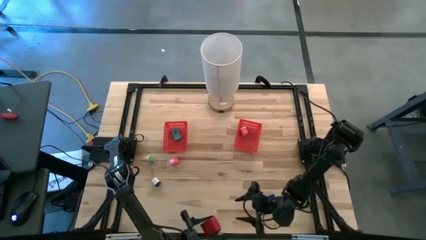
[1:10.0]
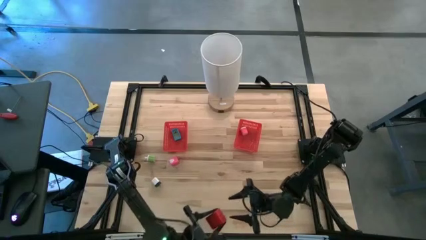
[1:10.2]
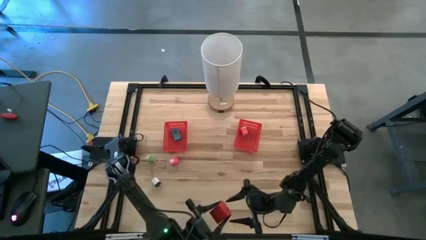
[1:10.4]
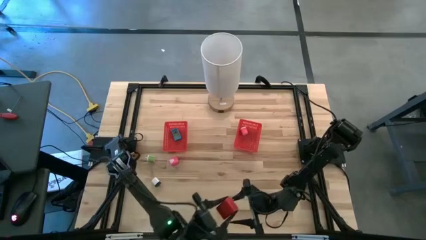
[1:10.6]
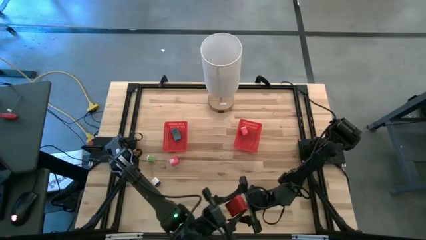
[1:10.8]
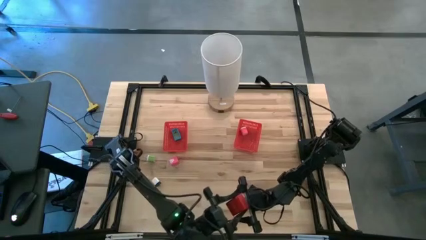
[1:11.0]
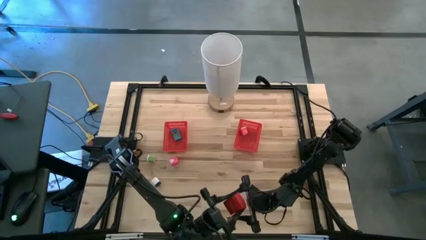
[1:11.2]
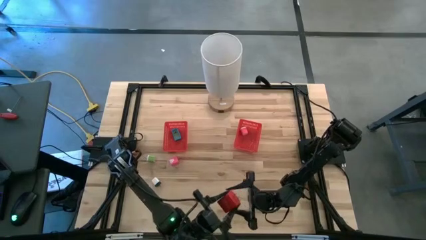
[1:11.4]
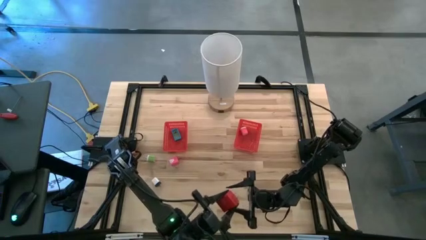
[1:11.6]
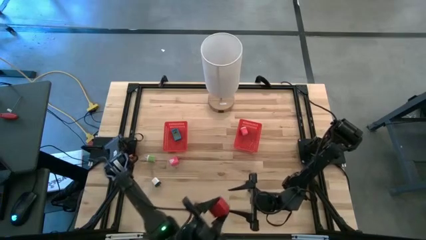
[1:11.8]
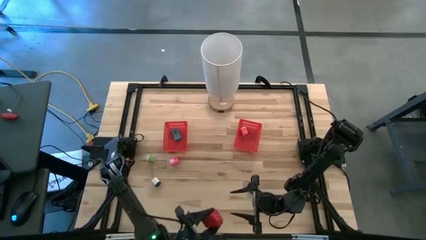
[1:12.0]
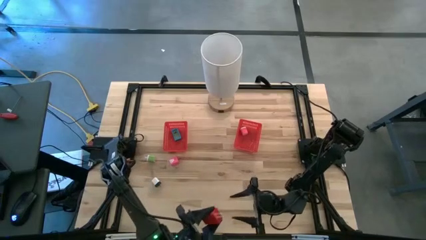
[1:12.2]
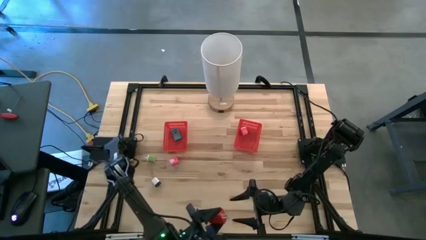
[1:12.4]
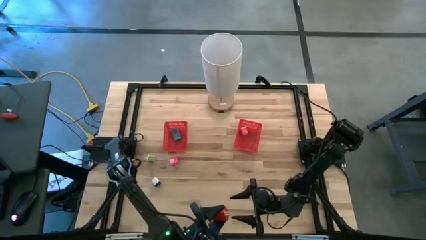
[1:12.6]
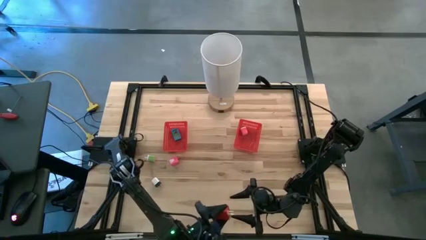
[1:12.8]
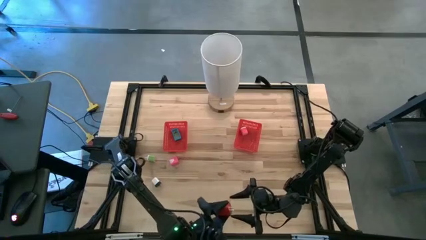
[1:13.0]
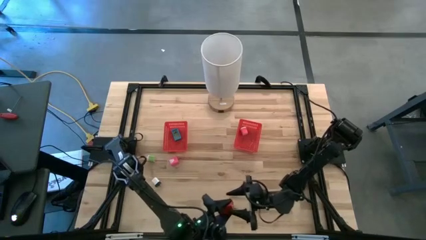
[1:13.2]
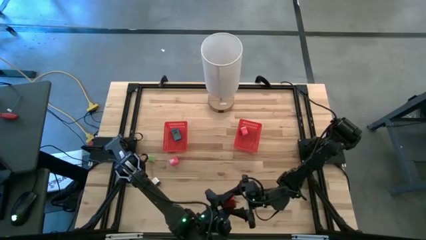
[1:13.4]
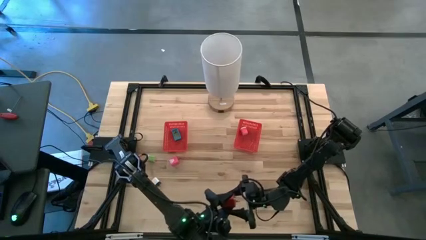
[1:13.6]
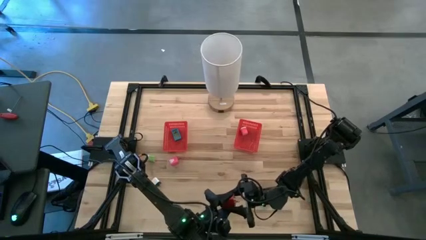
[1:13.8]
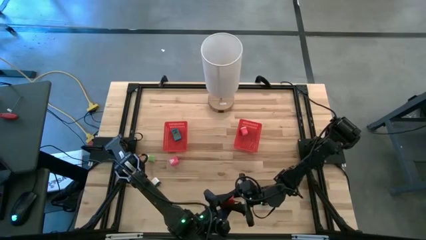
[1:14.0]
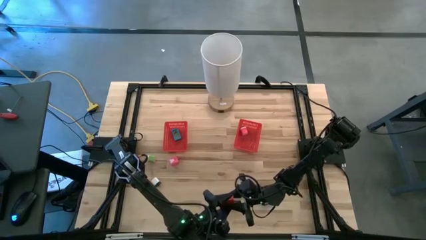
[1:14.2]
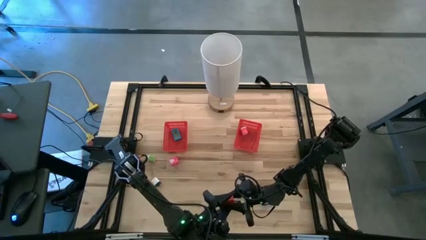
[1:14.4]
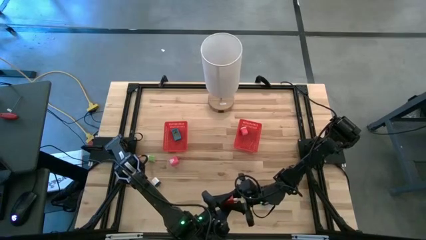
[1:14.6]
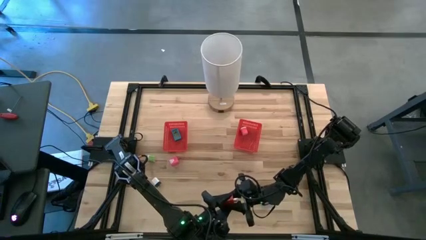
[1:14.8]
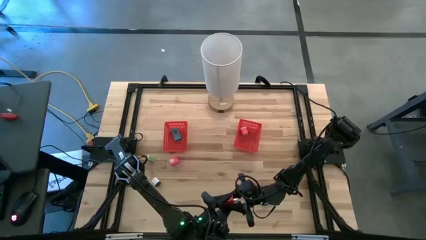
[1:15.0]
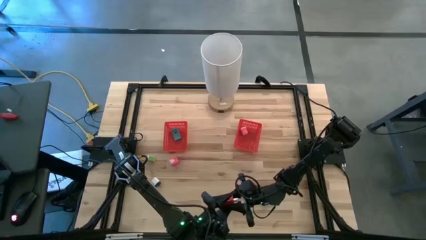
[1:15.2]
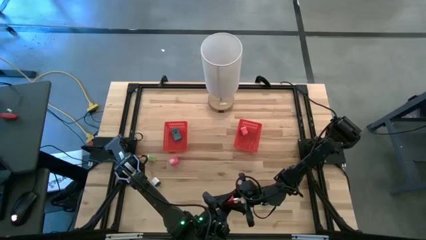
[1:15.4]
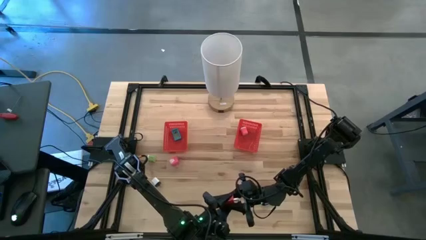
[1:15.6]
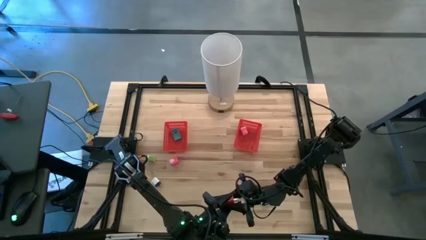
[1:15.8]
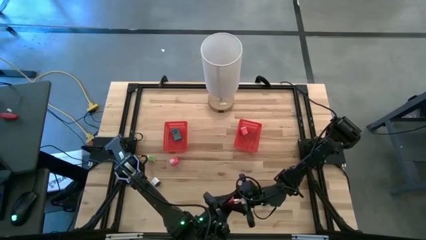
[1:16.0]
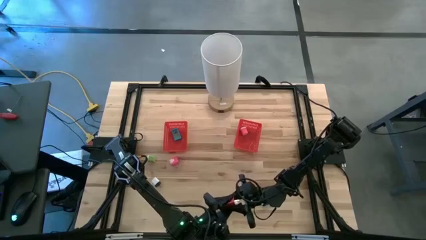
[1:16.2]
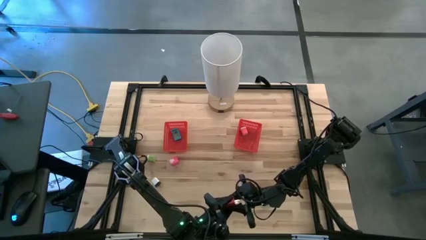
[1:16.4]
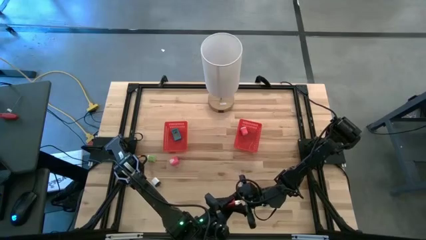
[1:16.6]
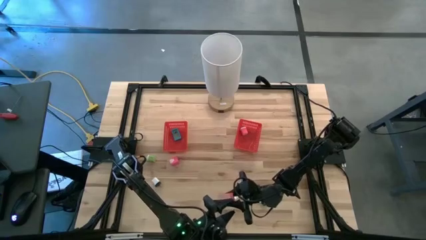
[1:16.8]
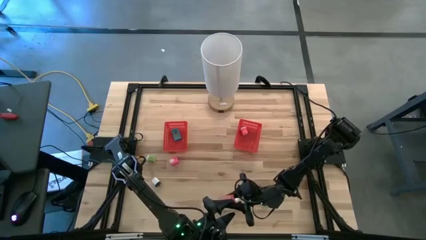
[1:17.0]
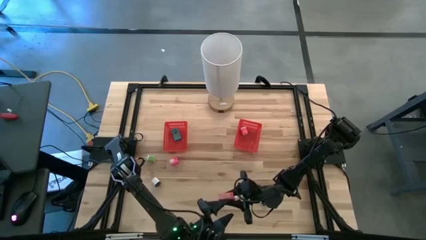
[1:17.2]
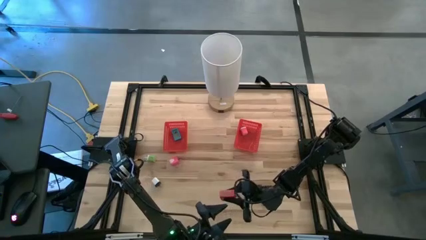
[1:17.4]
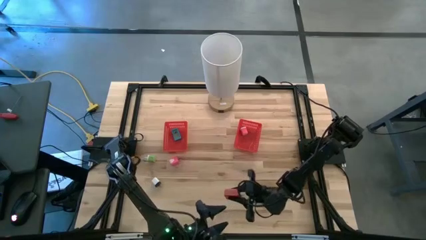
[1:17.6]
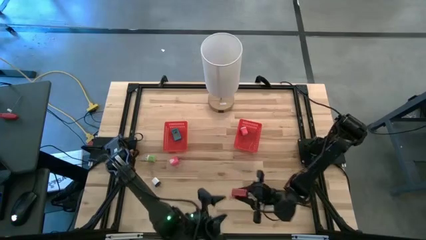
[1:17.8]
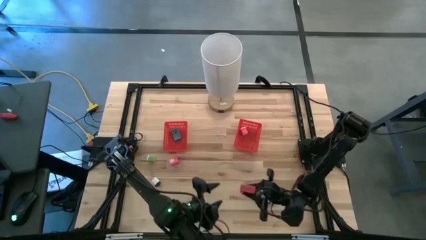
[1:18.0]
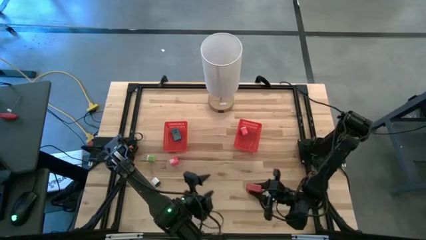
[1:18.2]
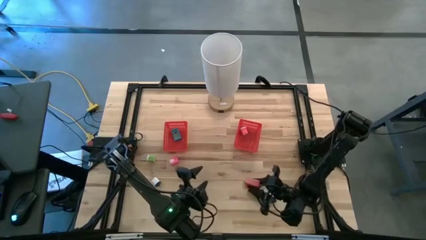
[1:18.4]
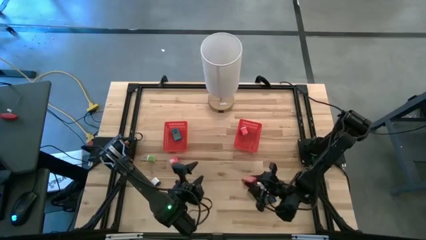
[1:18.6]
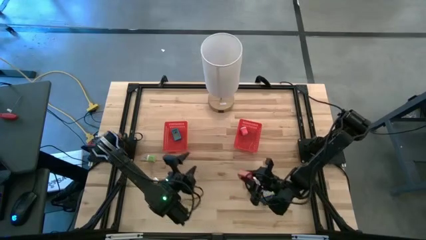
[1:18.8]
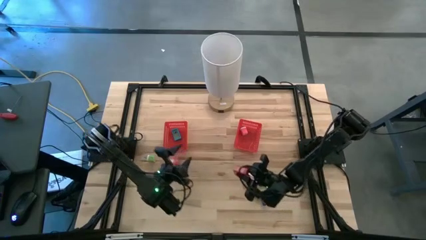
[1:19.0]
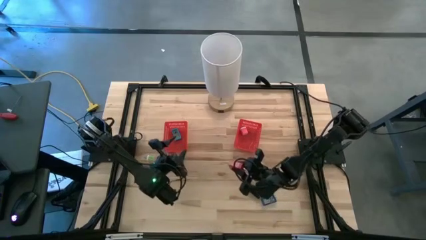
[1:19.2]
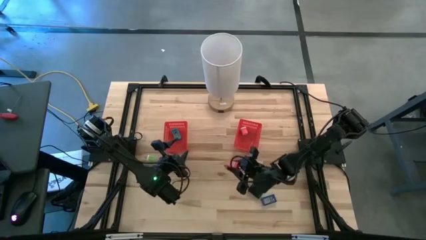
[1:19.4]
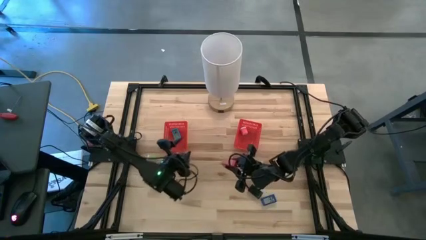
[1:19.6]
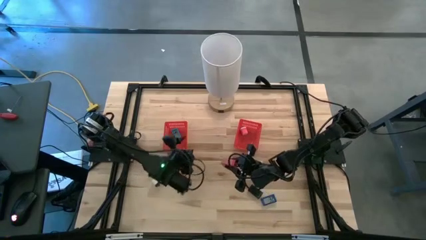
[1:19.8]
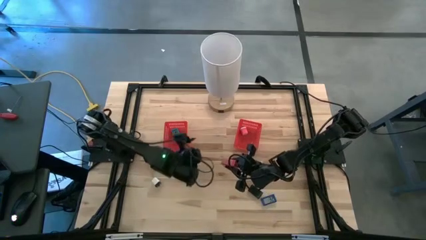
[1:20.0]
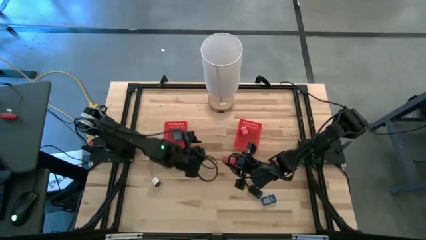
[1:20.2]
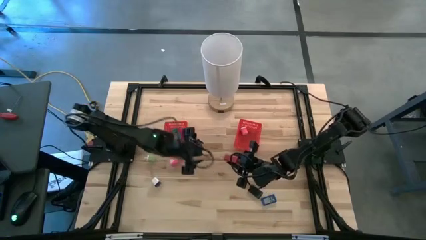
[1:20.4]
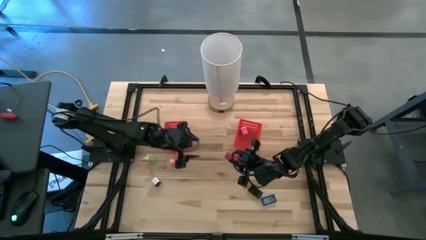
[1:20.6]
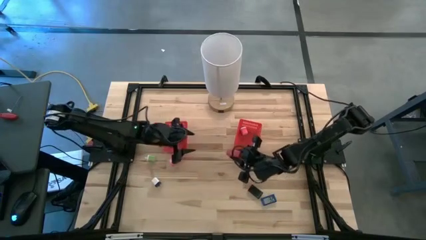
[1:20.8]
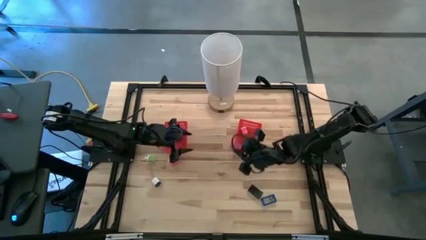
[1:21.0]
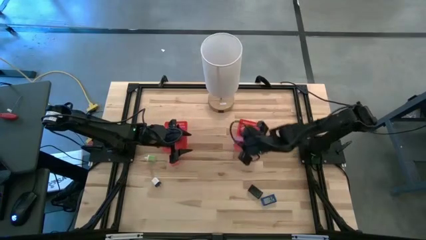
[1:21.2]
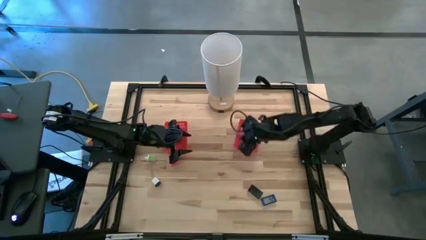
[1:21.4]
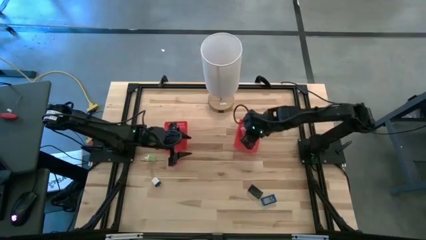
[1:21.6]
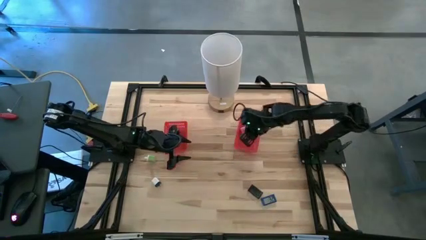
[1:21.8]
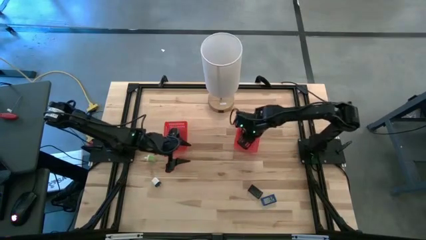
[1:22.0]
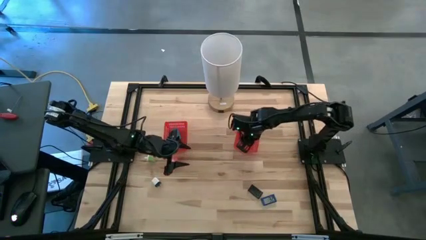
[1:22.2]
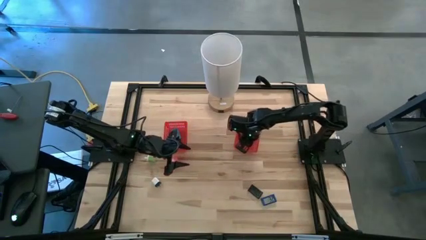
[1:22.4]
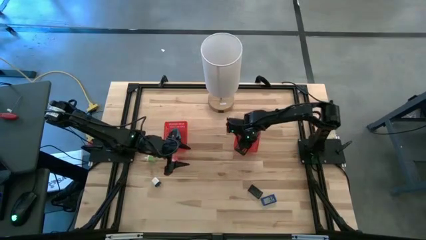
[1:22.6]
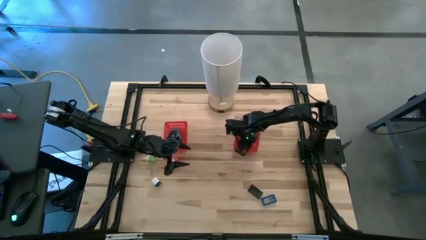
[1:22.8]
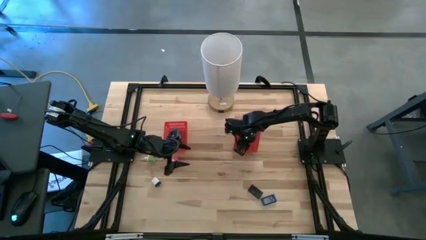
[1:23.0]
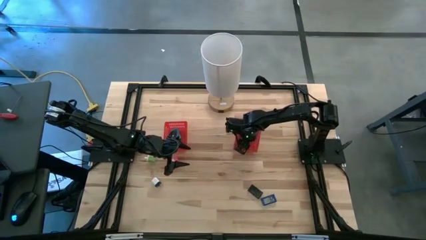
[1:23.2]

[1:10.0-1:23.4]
Task: Pick & Place Office items
Put the red charger adapter into the right red bin

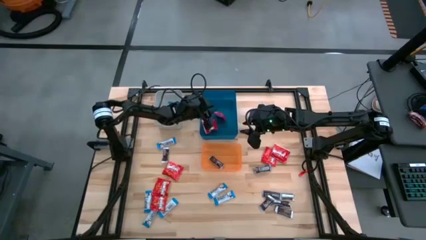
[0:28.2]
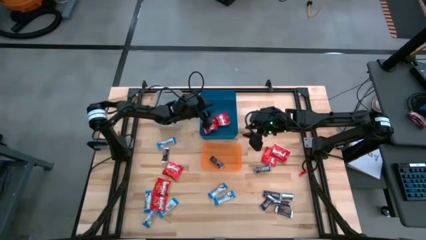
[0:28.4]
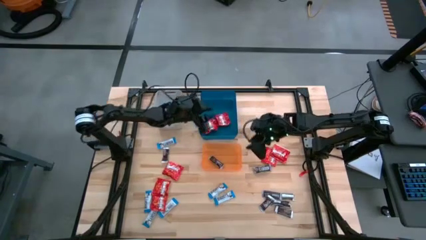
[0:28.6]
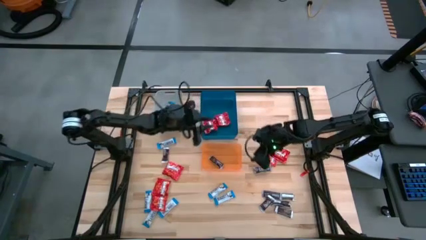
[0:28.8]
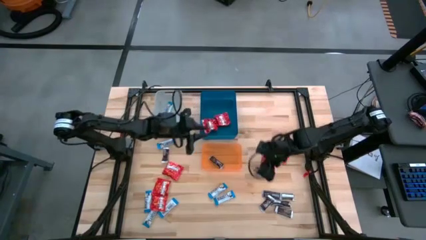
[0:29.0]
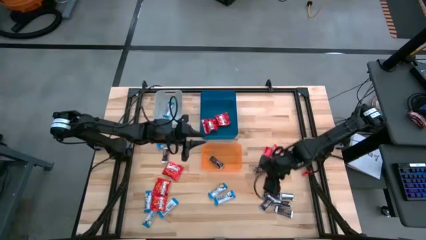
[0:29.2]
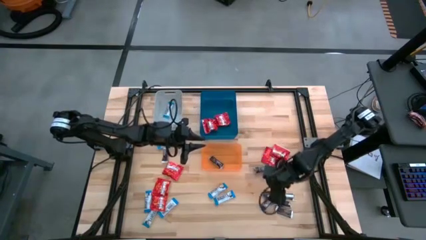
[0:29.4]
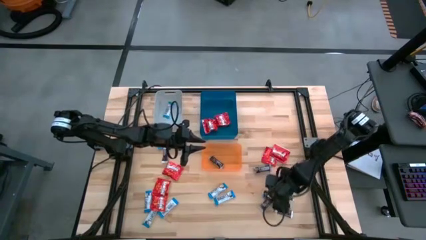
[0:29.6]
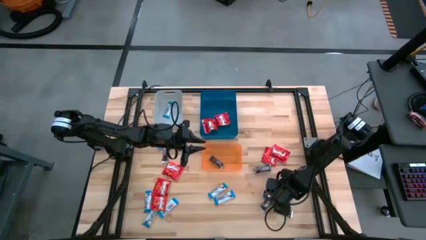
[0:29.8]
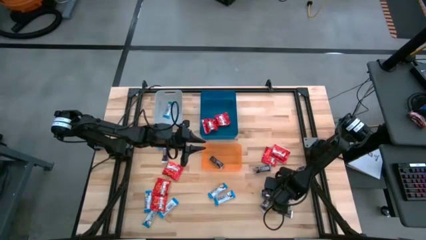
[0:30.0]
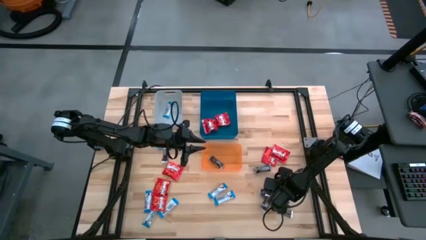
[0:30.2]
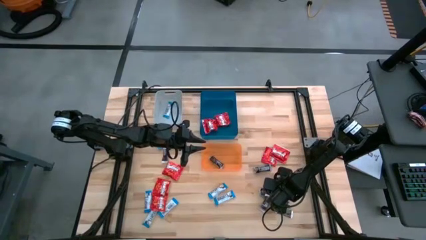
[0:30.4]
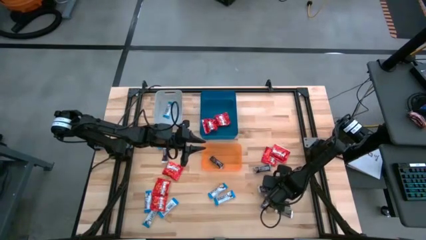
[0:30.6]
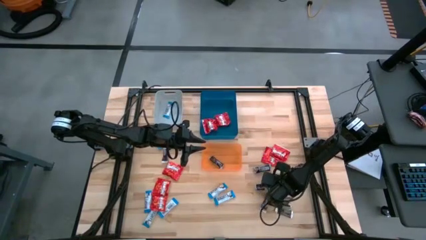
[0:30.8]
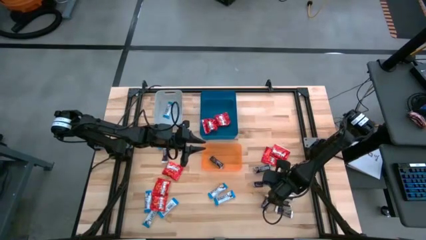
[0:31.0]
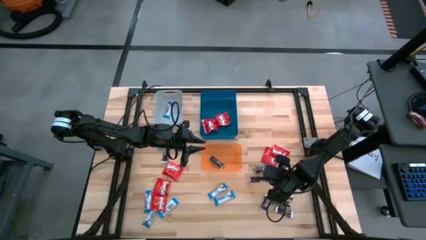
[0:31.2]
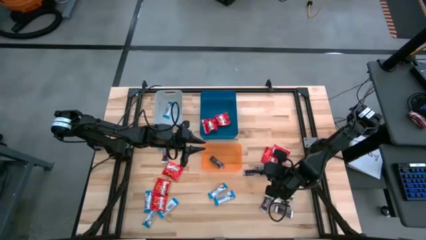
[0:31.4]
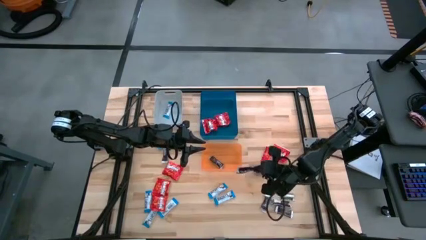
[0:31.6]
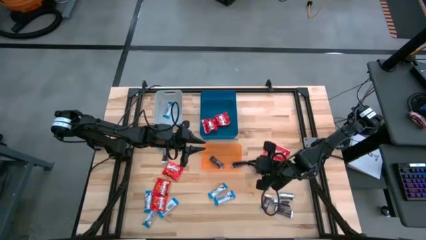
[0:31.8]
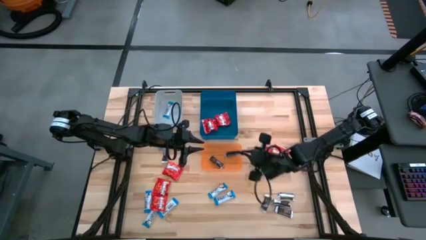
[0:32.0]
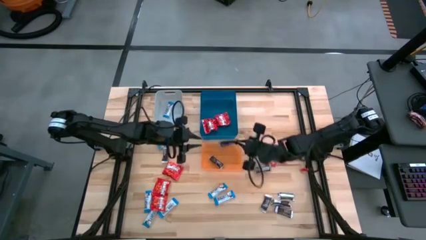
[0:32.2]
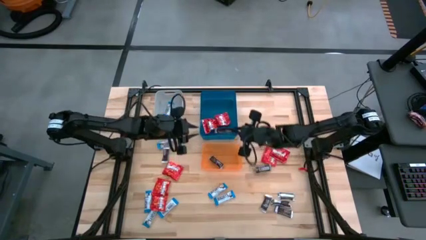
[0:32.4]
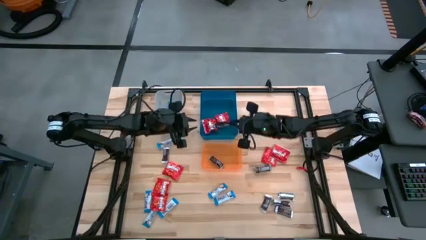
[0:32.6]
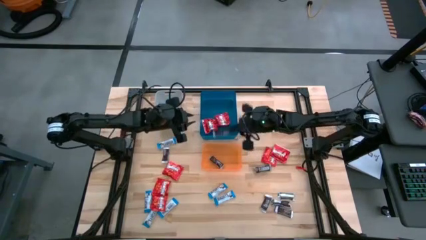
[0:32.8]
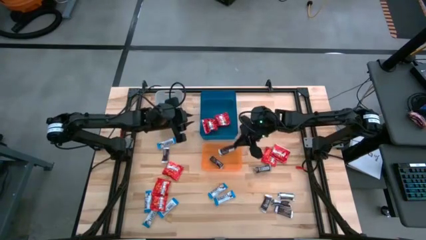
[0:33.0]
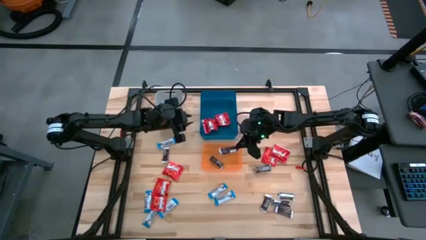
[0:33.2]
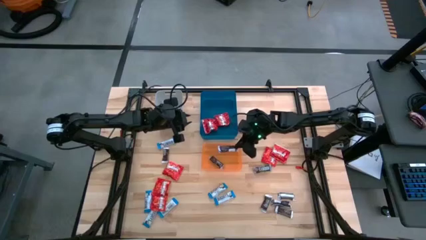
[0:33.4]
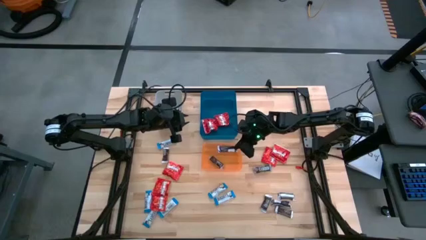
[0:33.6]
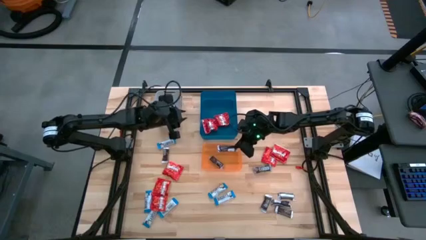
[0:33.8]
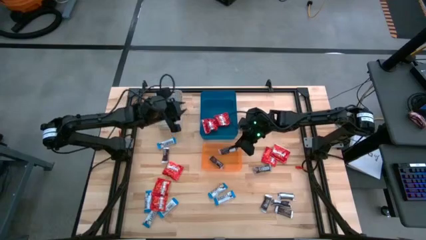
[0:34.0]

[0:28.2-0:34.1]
Task: Sort candy
Put the brown chocolate bar into the orange bin
